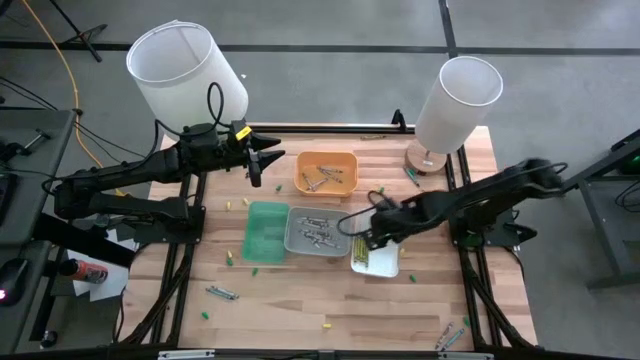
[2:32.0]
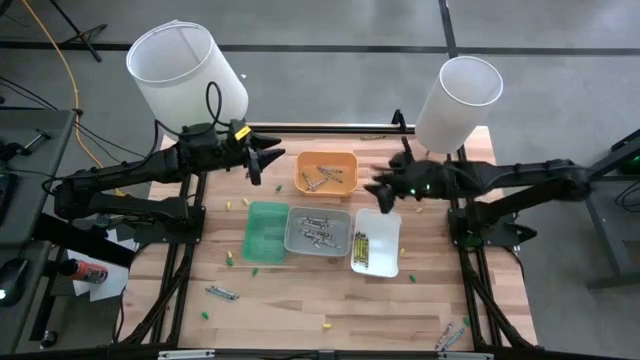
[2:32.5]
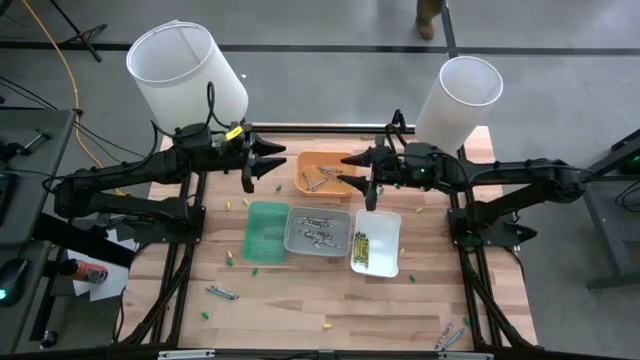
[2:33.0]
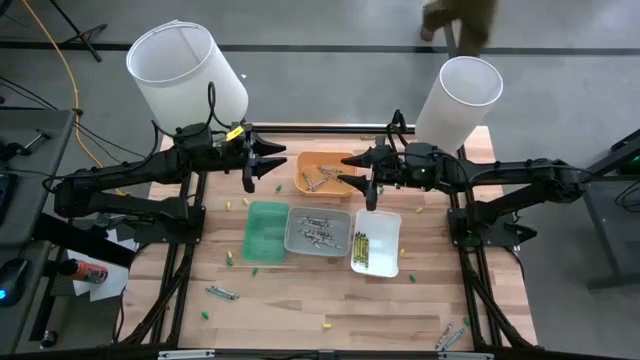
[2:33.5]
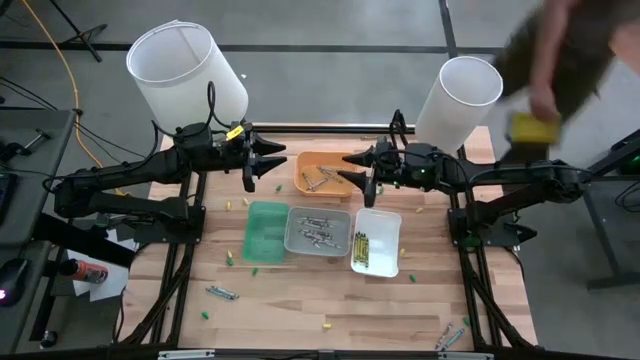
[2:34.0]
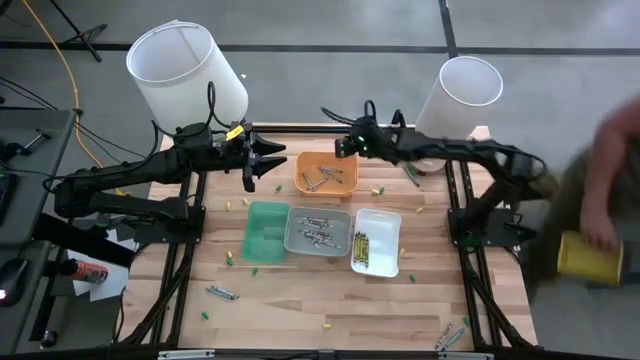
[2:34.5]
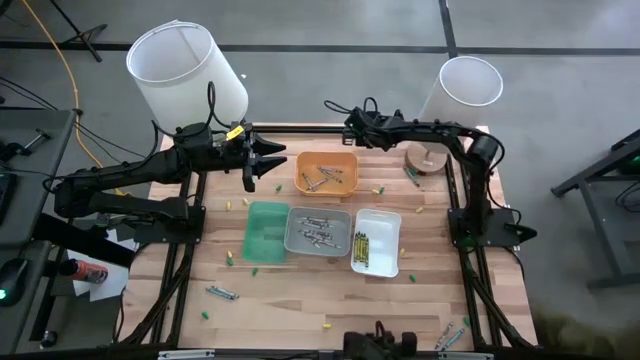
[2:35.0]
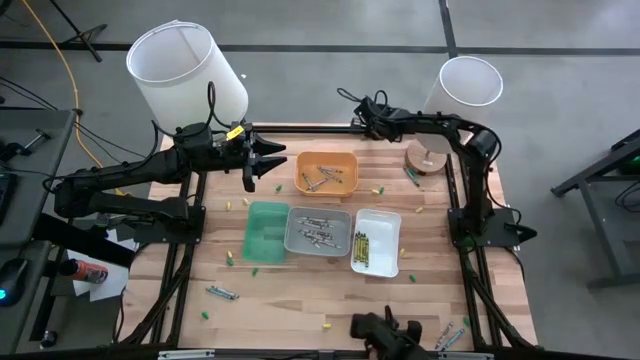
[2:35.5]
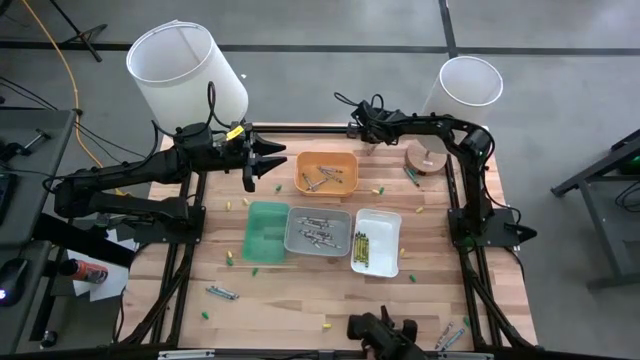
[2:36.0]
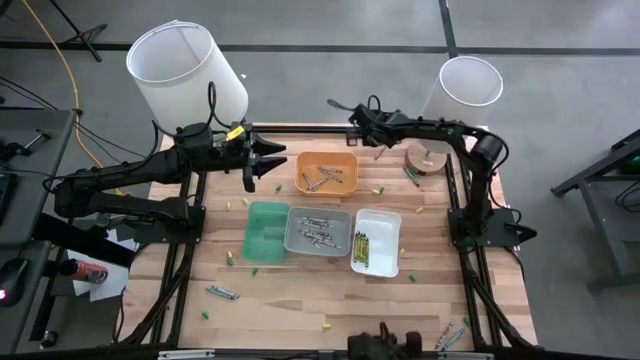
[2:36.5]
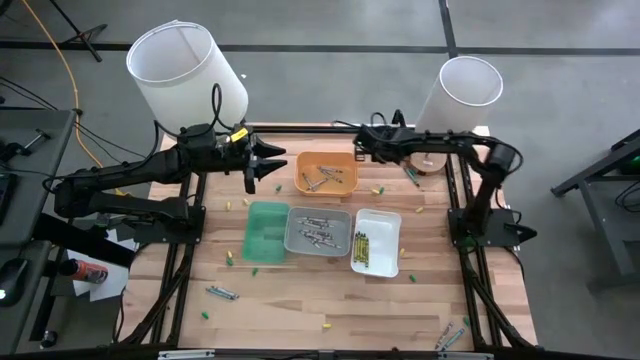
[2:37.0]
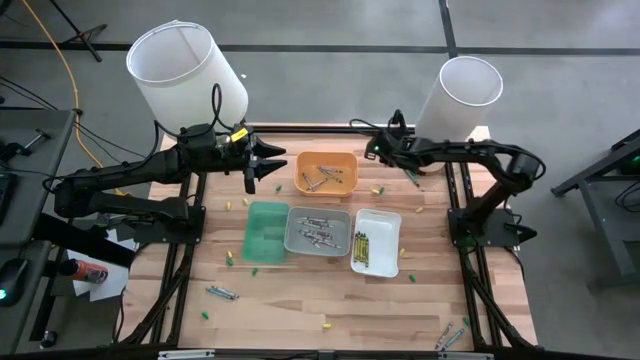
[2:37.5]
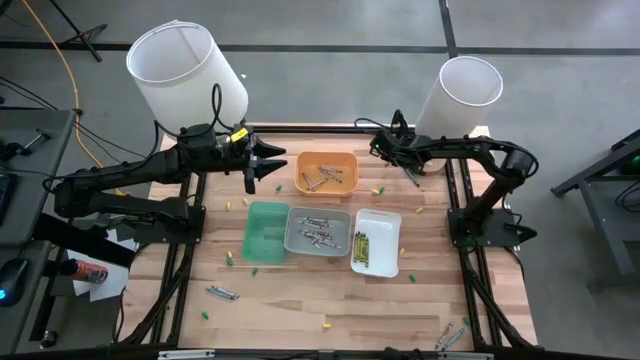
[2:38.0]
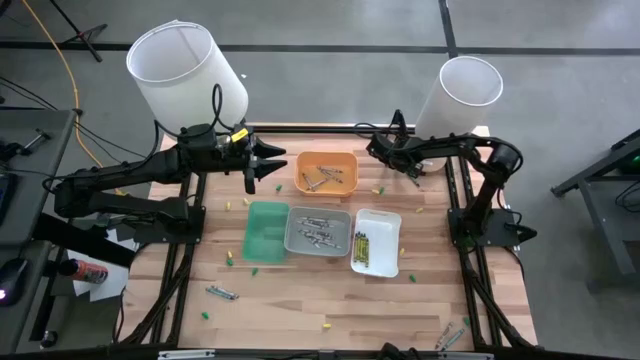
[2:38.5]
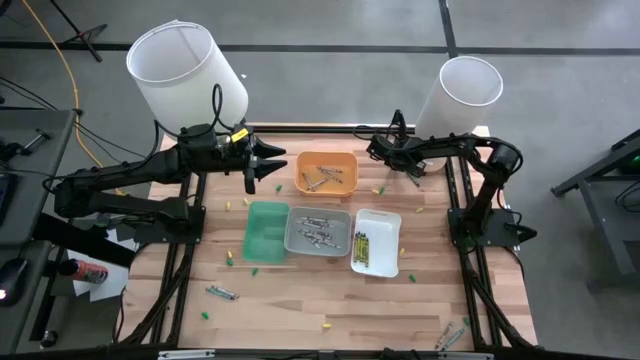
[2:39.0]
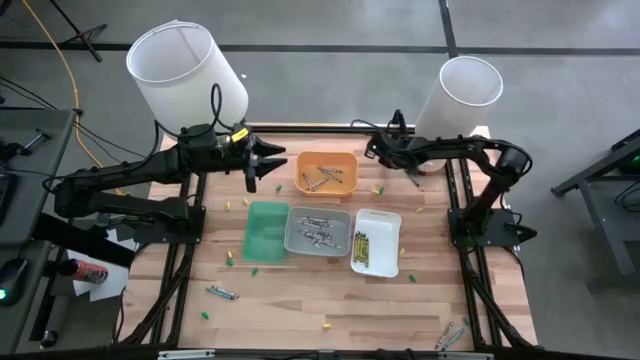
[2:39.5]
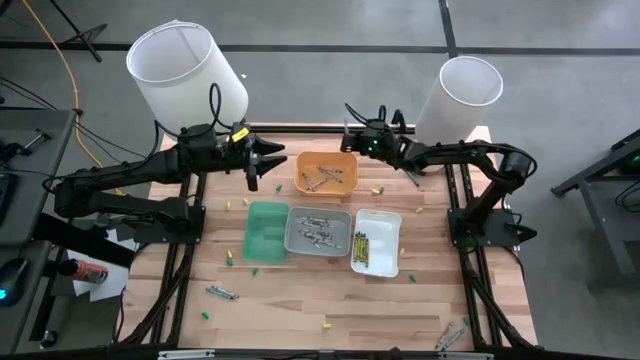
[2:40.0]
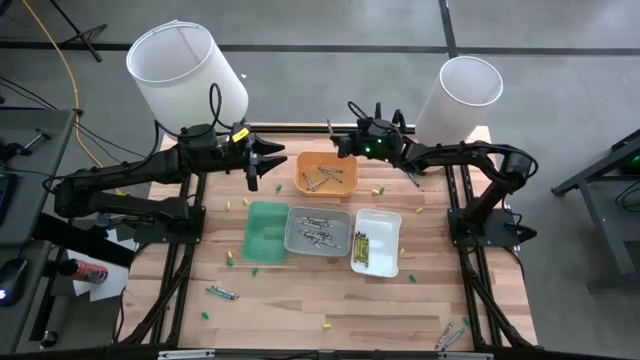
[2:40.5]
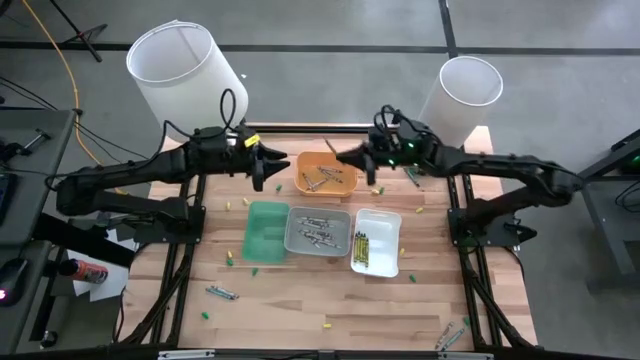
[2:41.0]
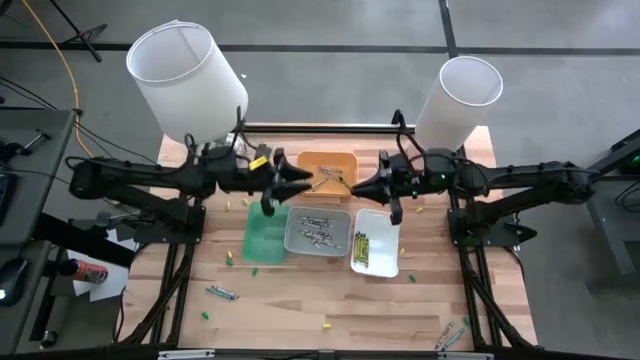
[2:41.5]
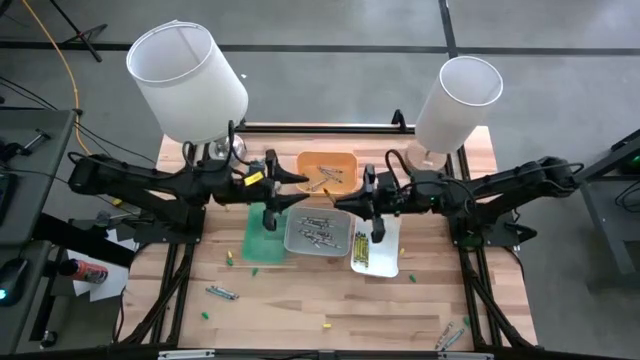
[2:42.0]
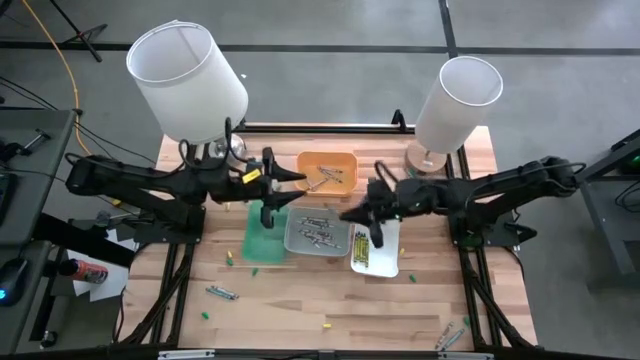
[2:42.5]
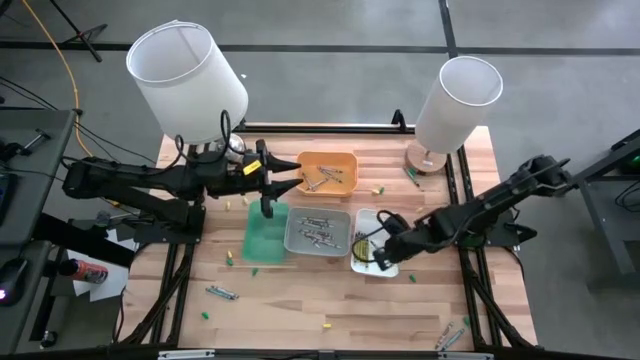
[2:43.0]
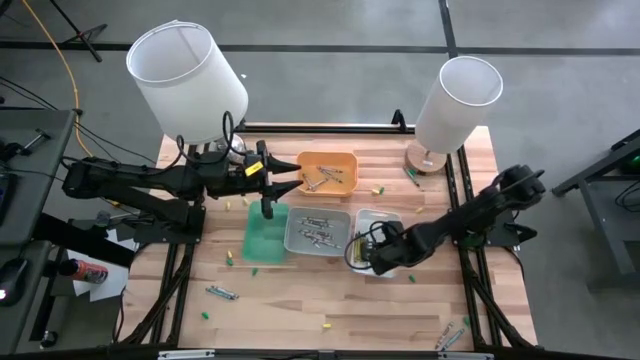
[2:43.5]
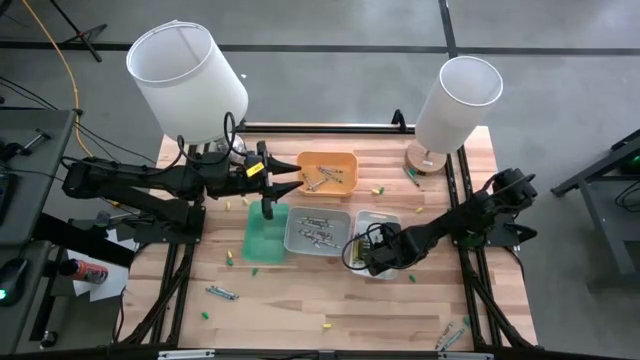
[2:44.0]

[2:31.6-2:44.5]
Task: Sort crayons
Put the green crayon into the white bin

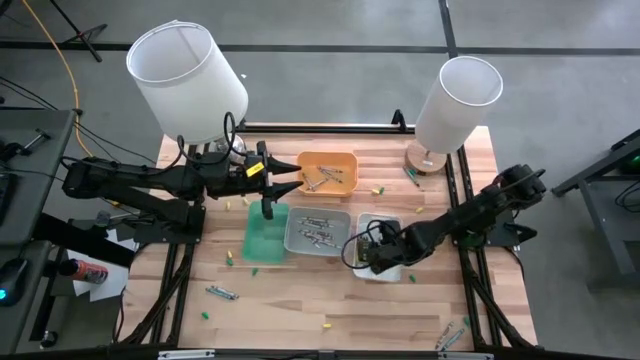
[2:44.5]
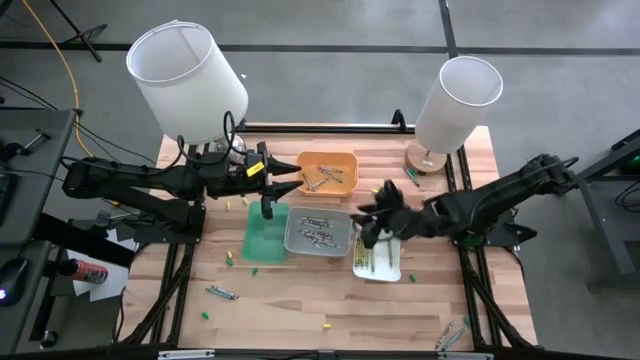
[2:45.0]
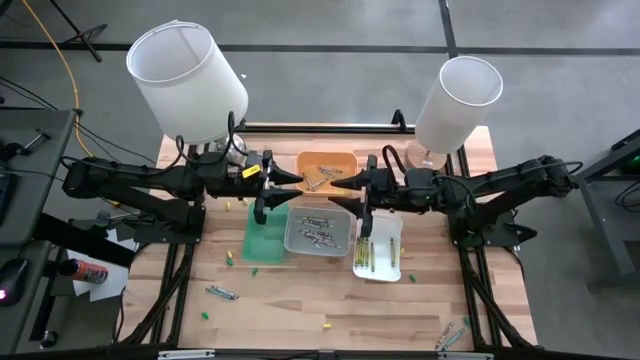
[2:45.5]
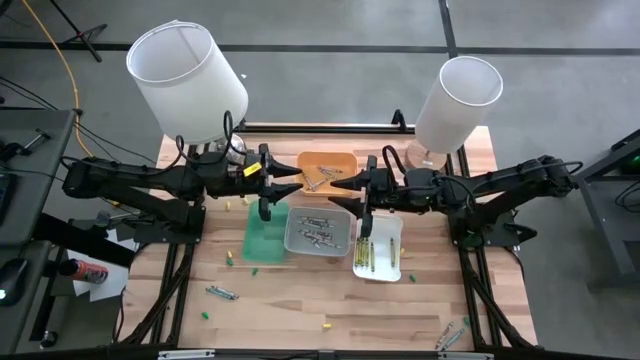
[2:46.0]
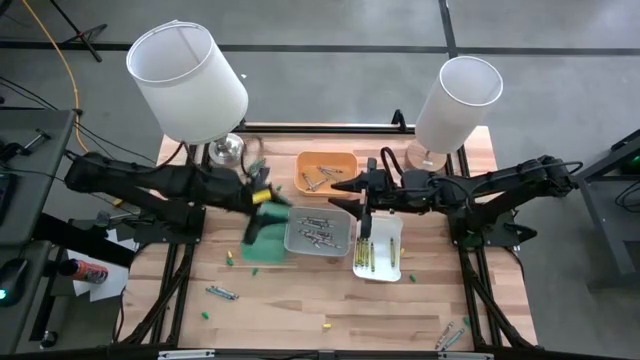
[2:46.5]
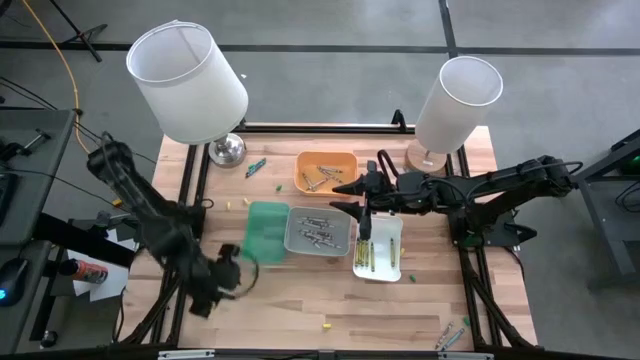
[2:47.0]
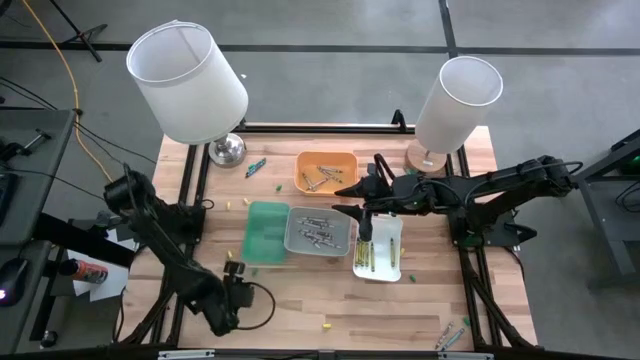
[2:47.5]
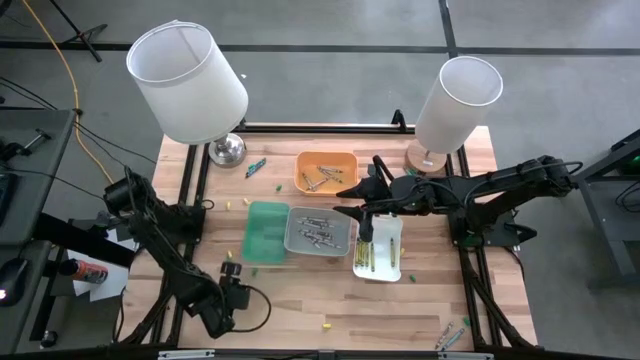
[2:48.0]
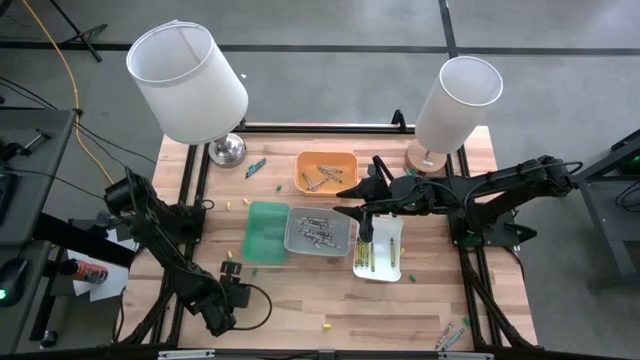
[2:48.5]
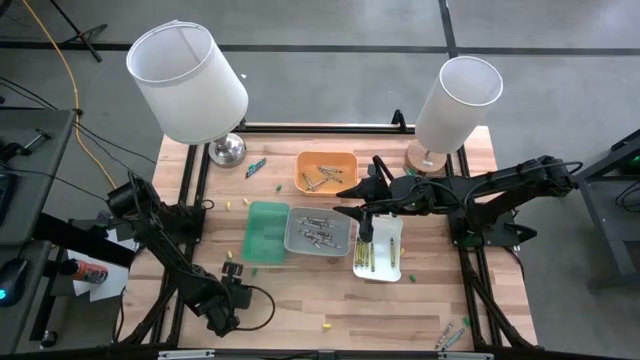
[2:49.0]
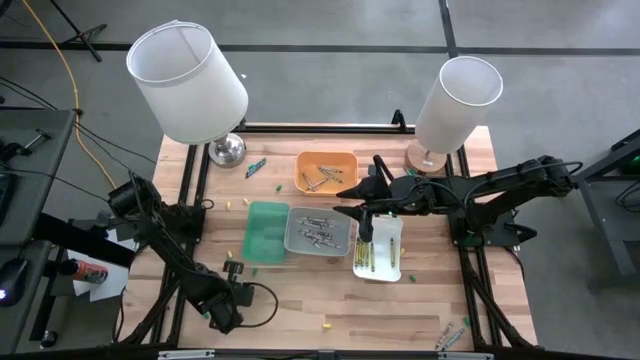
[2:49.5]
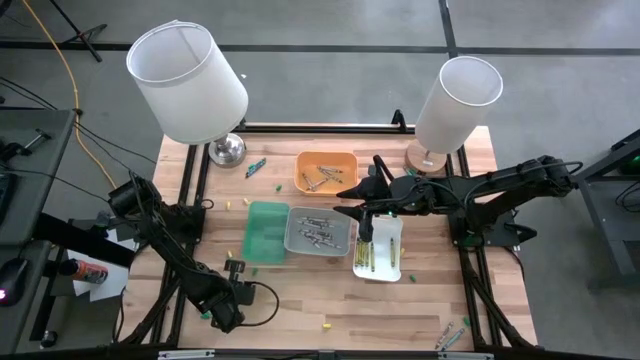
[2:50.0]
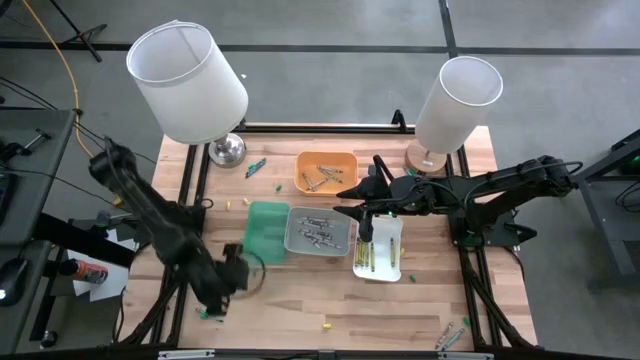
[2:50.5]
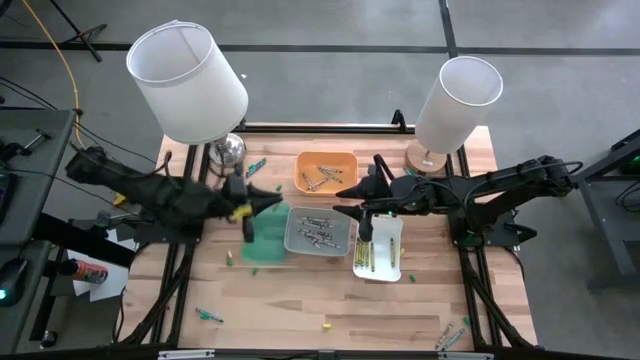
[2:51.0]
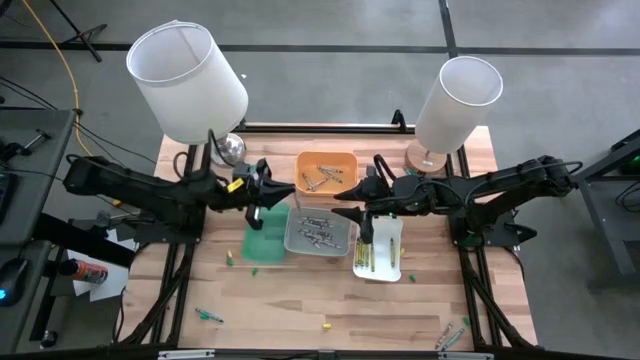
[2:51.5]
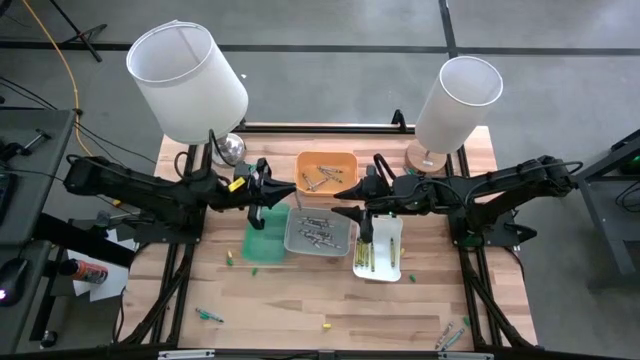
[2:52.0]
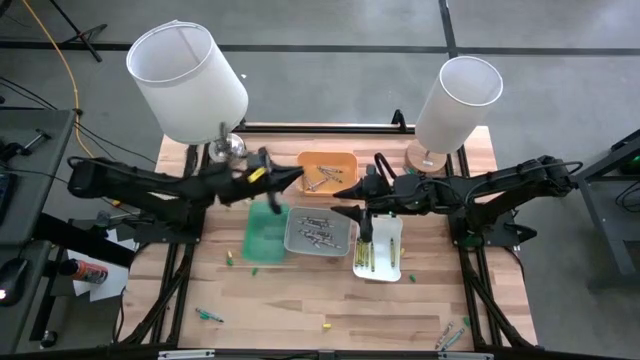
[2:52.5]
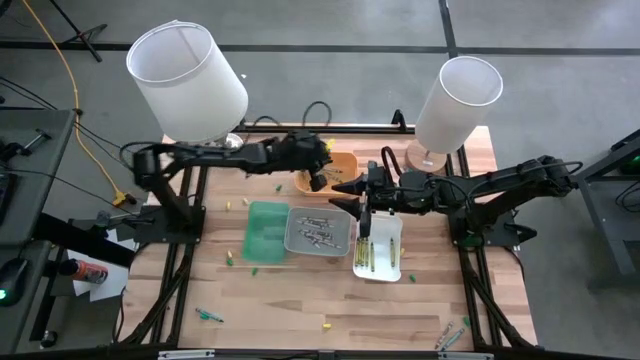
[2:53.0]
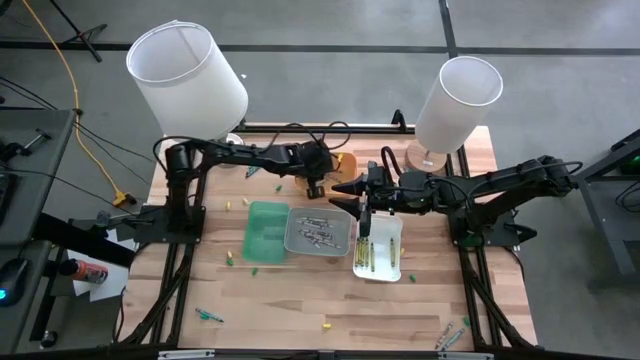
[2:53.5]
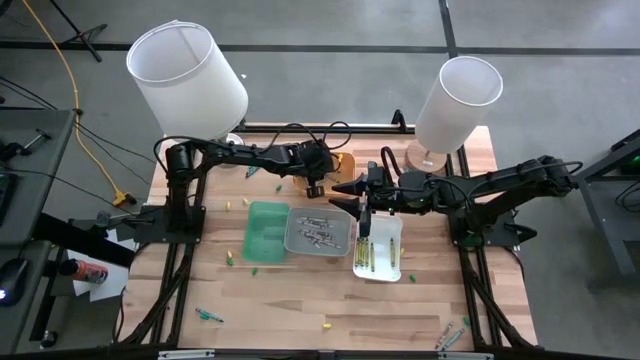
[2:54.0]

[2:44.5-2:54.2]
Put the gray crayon into the yellow bin
